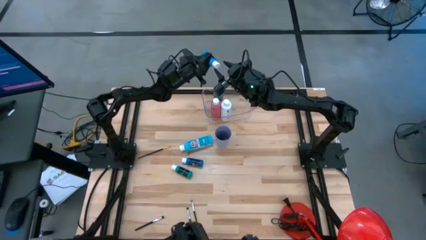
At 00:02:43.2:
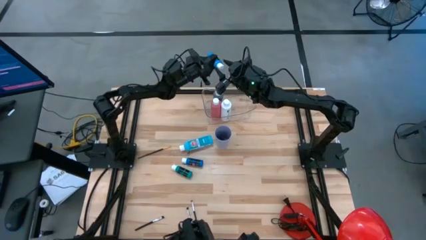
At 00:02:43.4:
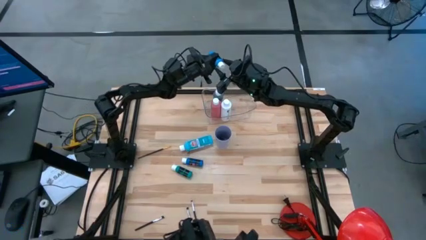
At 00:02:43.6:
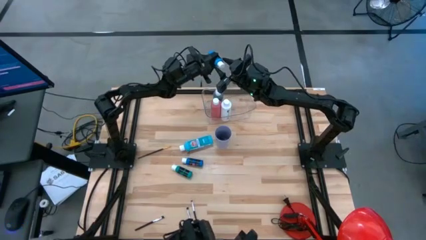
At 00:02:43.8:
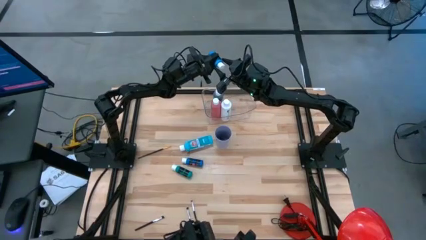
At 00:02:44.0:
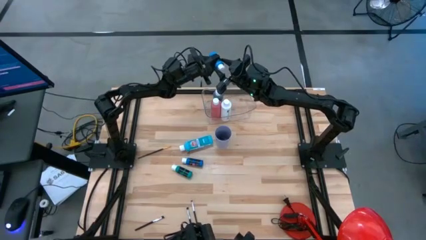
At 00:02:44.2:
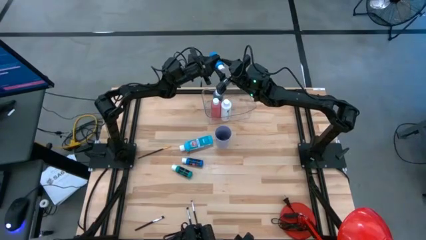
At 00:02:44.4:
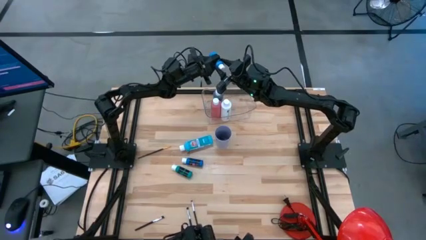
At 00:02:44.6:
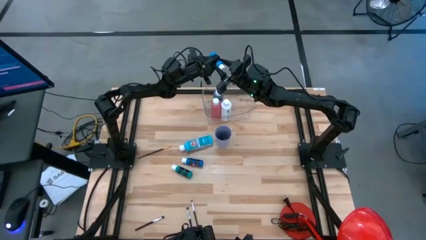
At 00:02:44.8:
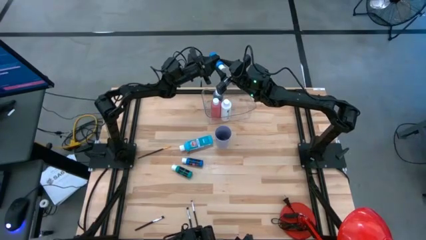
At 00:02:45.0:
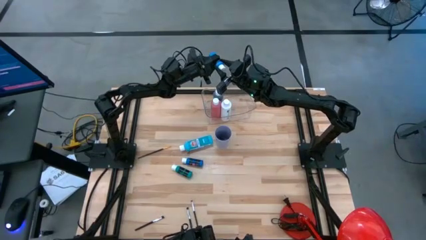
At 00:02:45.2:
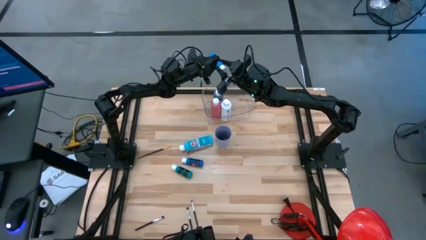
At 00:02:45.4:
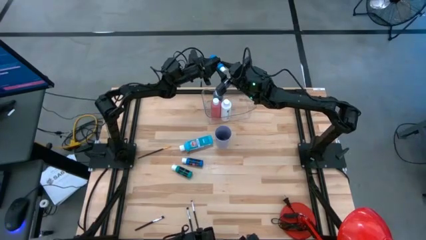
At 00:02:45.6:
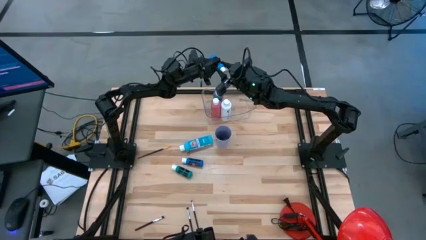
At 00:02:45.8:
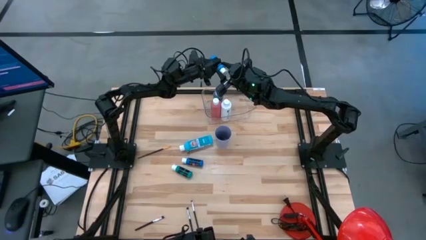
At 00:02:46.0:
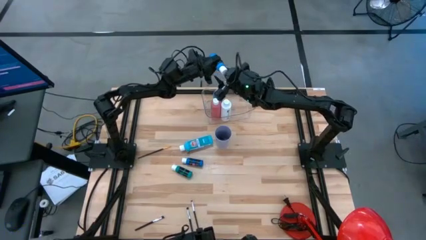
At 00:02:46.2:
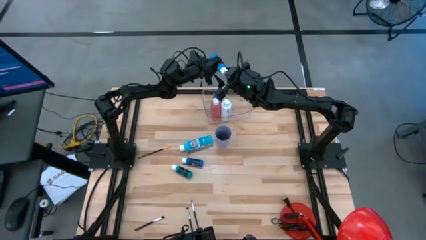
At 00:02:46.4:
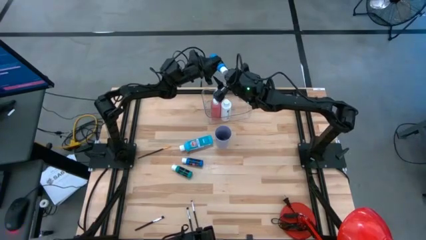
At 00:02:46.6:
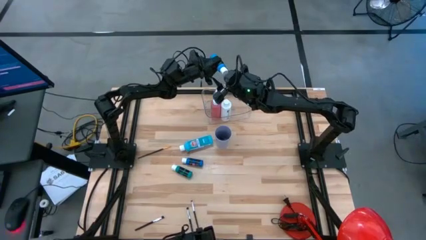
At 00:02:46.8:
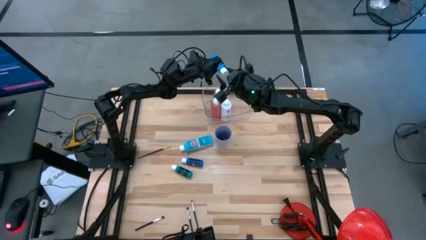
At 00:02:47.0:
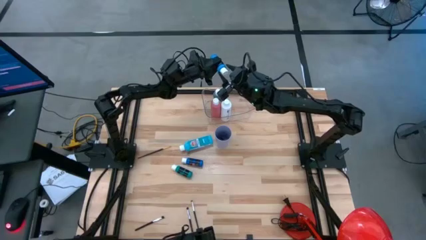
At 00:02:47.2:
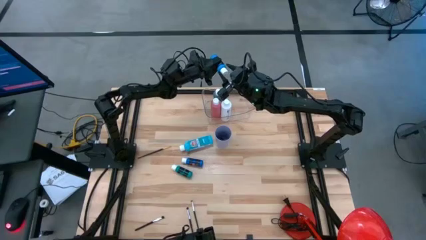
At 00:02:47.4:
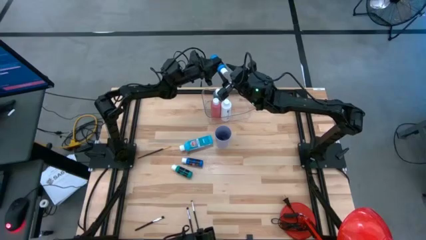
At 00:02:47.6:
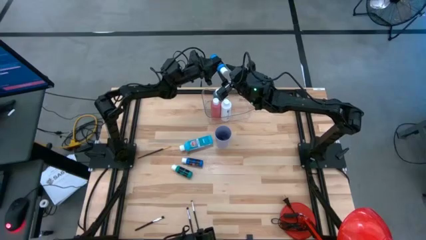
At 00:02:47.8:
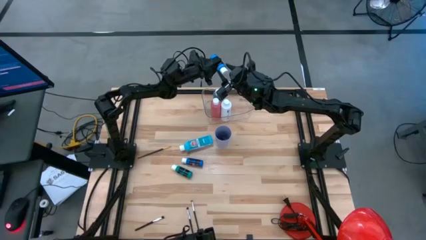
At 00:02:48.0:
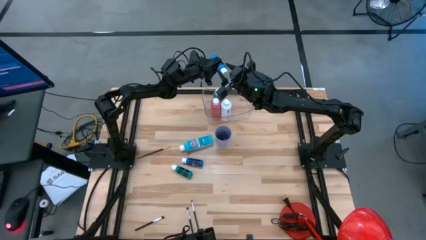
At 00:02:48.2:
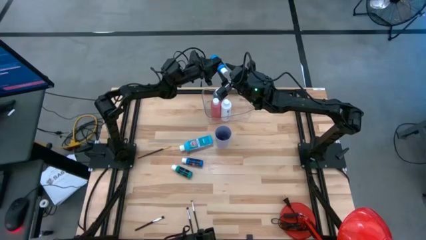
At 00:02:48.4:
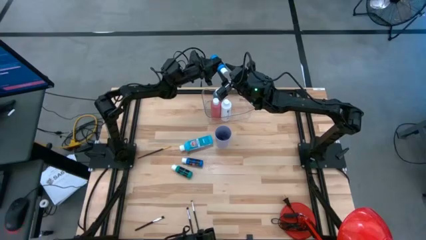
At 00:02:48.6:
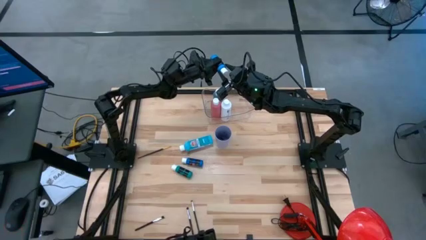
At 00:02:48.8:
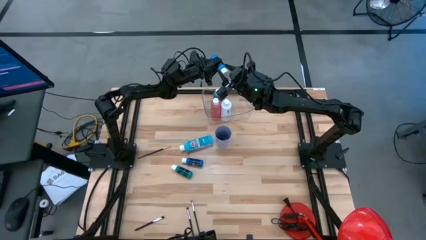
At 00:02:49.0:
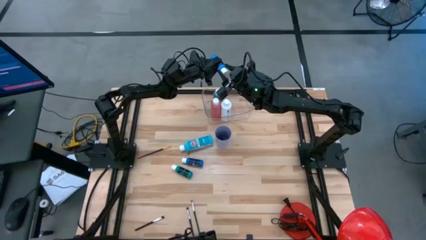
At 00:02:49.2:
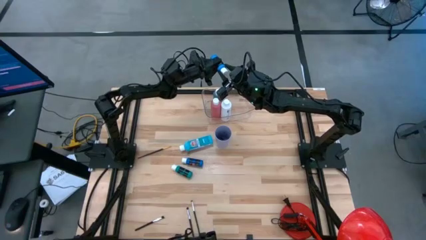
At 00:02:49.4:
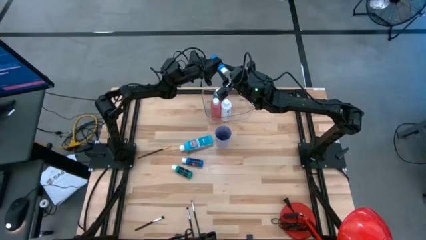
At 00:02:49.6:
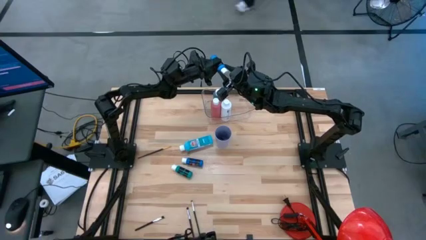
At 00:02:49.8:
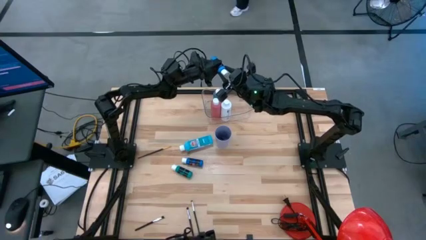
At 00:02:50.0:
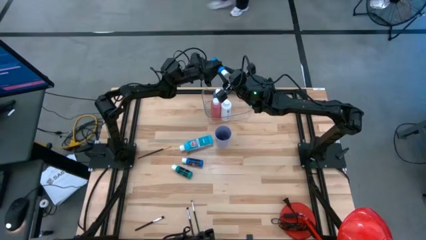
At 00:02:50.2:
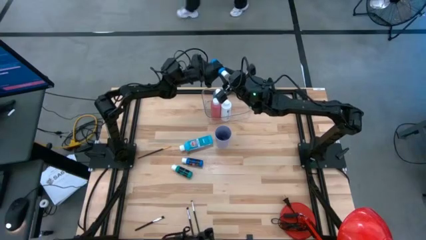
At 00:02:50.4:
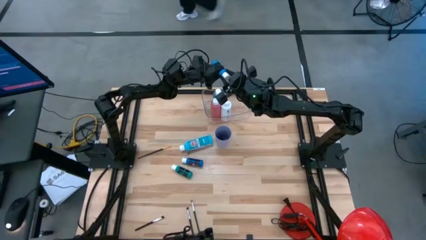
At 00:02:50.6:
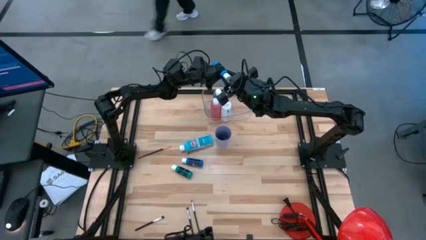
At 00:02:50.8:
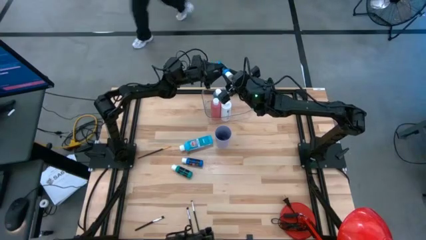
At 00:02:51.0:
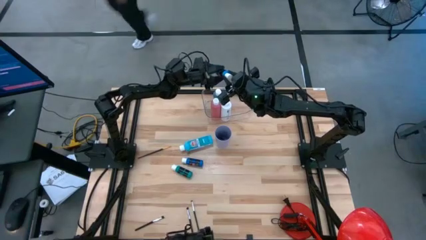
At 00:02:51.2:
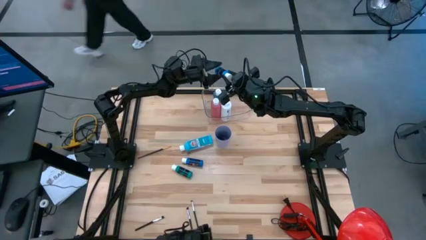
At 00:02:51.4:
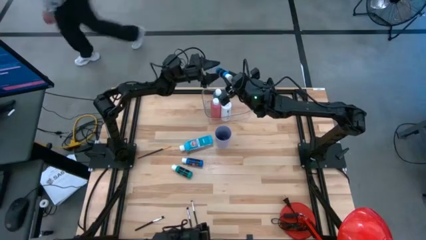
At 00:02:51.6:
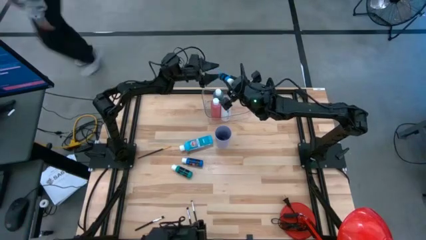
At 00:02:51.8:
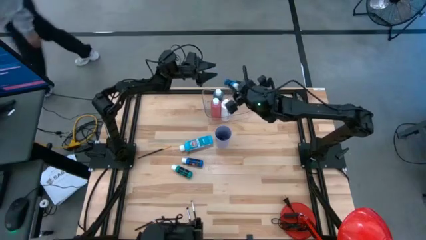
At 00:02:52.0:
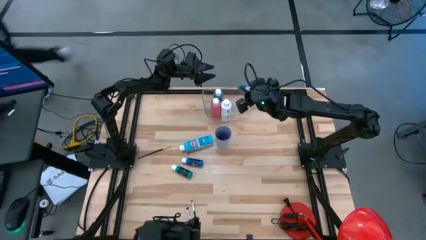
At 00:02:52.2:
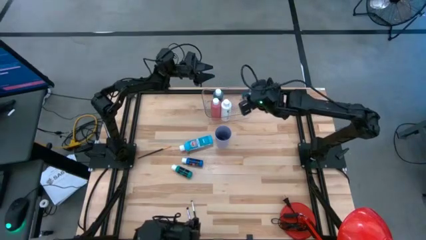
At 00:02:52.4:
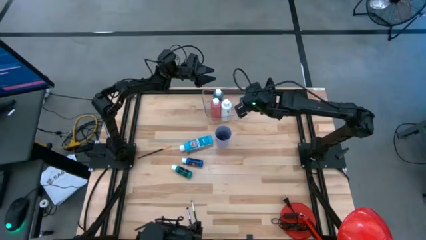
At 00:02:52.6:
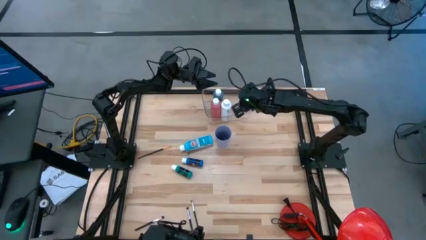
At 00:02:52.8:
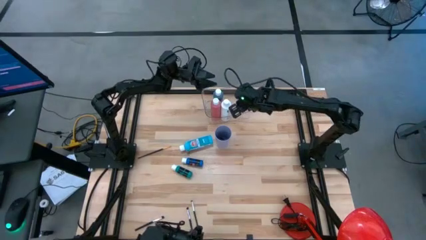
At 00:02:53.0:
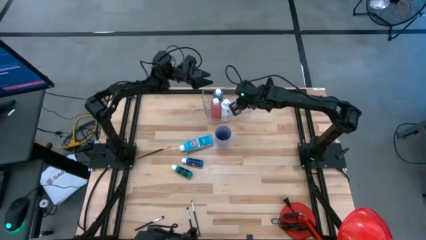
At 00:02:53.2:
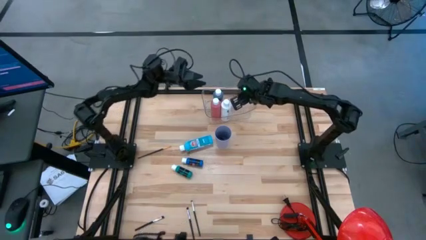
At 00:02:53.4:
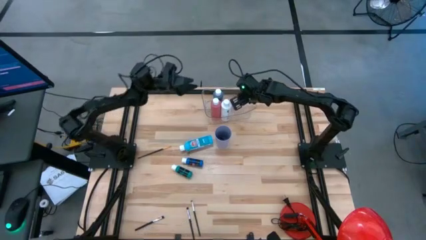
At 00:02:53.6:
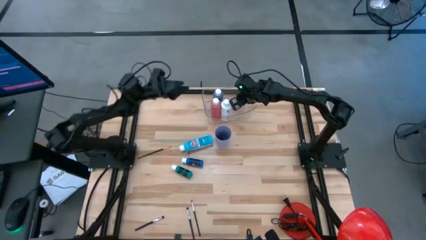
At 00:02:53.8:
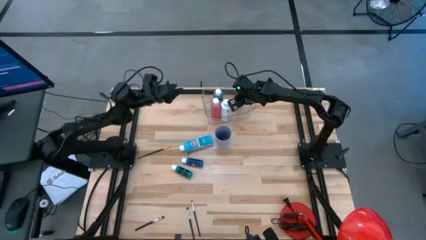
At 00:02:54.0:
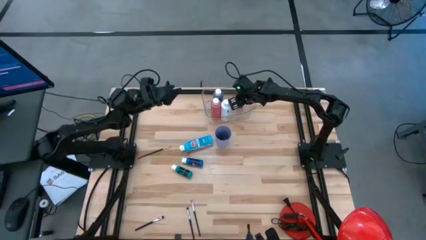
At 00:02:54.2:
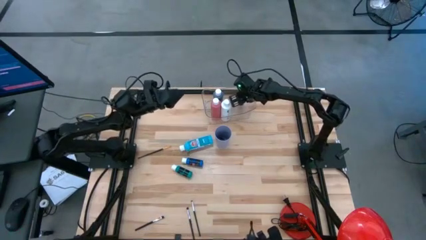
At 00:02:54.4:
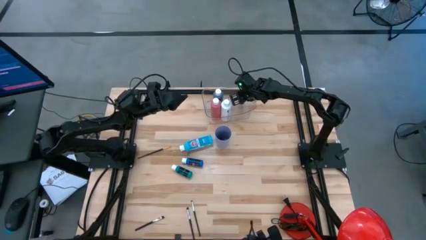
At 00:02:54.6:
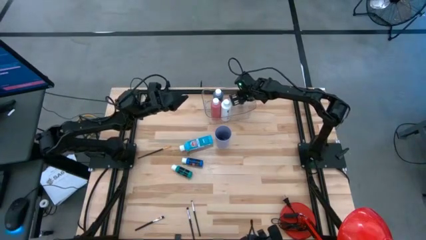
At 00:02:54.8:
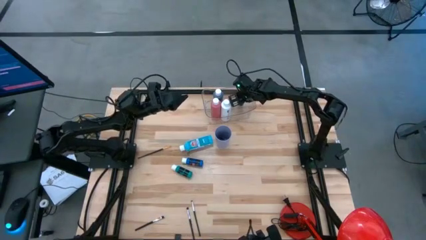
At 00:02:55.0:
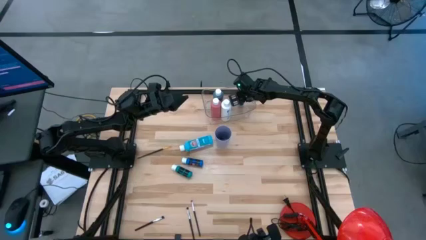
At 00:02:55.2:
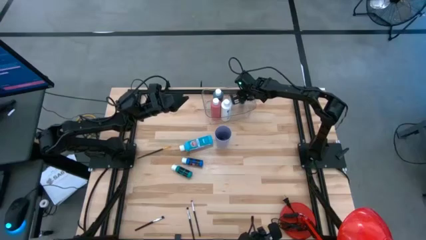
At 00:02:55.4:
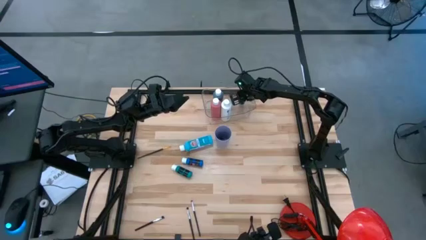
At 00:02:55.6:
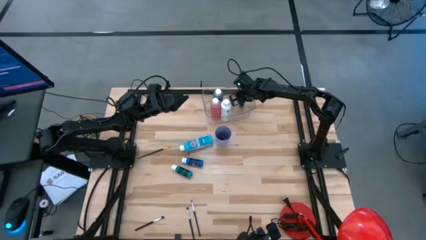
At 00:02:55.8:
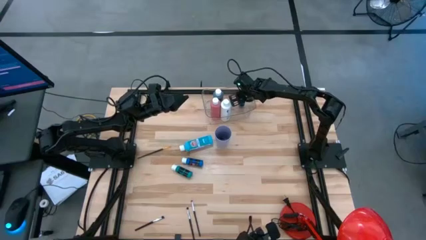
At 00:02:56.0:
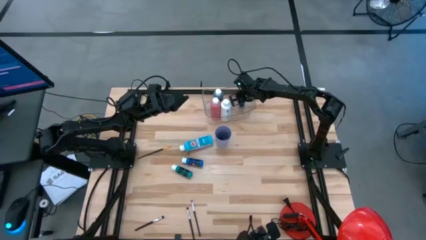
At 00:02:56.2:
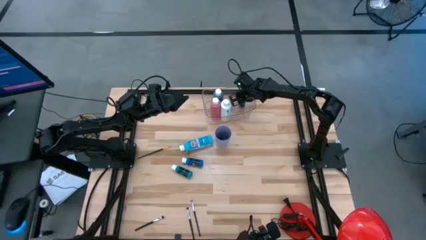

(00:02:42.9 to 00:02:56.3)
Task: Pick & Place Paint Supplies
Adjust the blue paint bottle in the transparent bin

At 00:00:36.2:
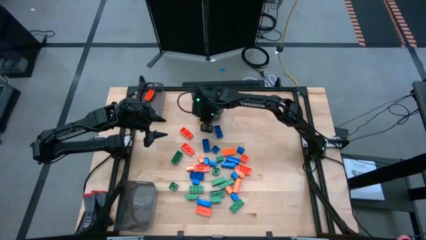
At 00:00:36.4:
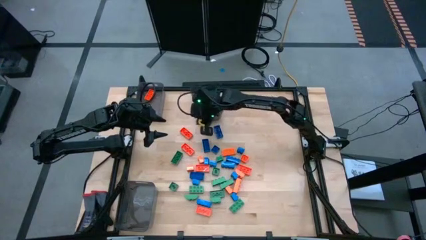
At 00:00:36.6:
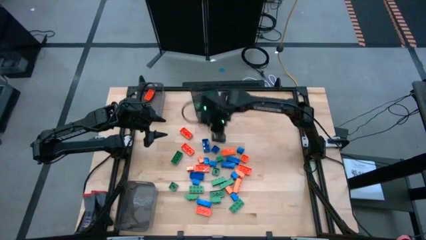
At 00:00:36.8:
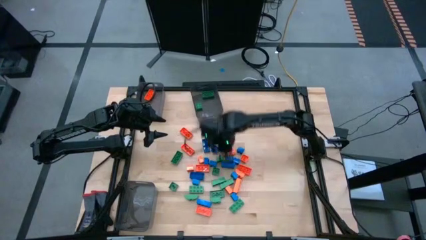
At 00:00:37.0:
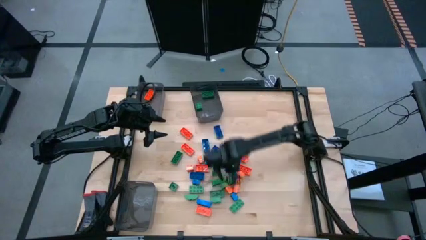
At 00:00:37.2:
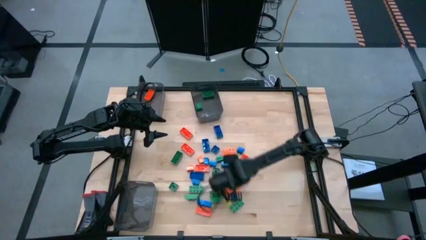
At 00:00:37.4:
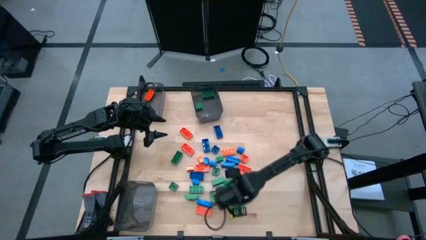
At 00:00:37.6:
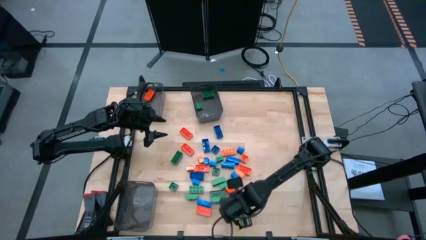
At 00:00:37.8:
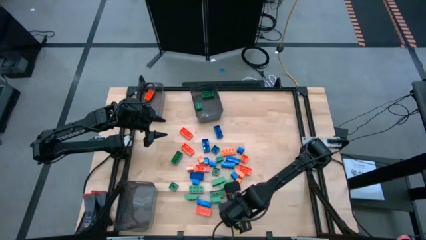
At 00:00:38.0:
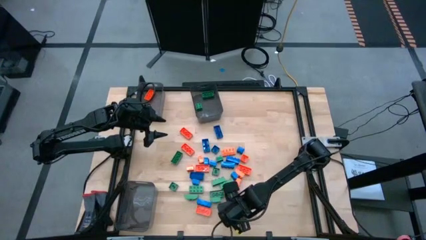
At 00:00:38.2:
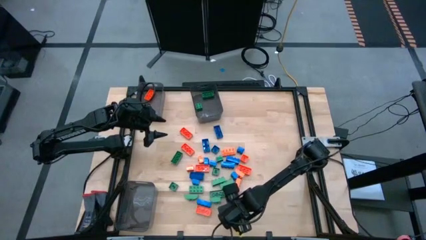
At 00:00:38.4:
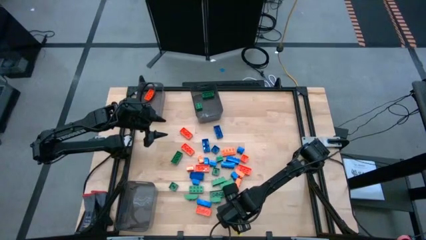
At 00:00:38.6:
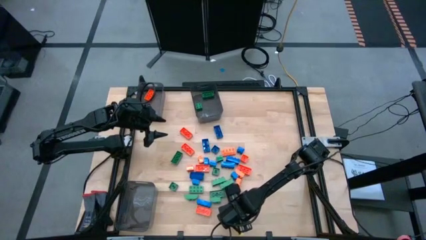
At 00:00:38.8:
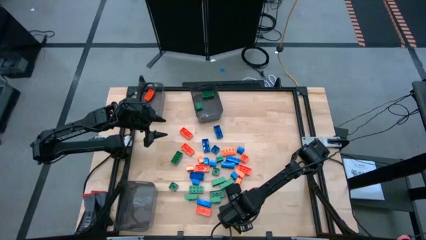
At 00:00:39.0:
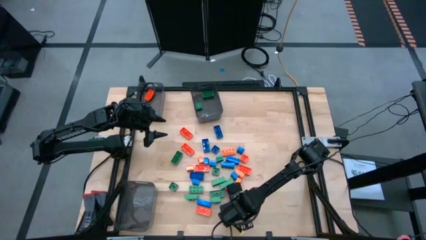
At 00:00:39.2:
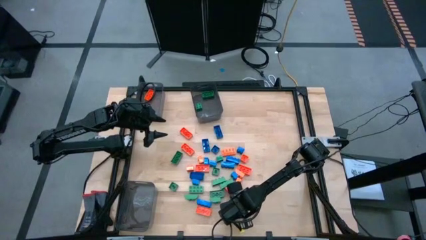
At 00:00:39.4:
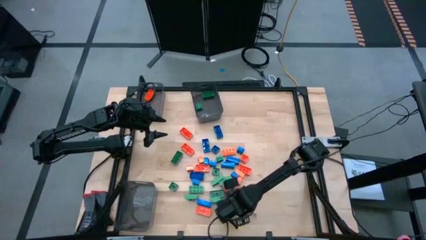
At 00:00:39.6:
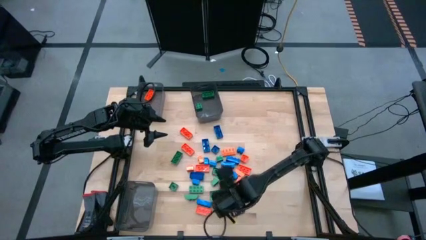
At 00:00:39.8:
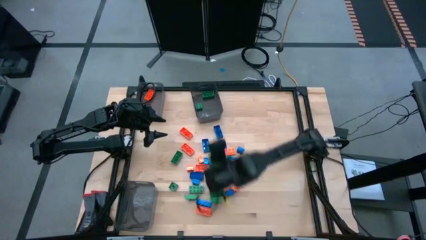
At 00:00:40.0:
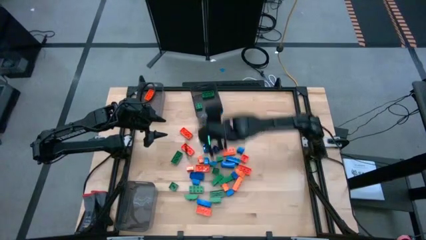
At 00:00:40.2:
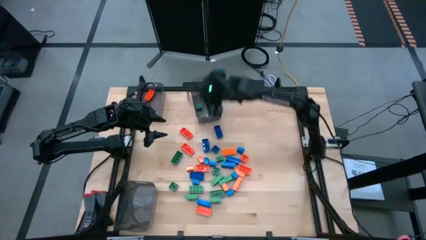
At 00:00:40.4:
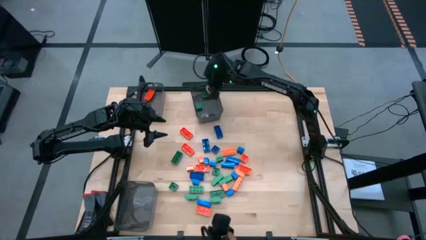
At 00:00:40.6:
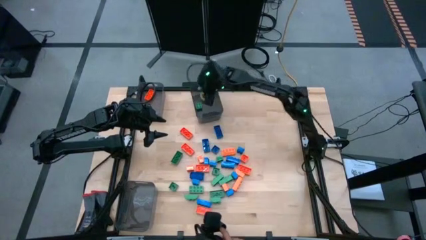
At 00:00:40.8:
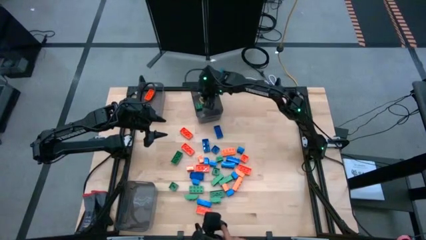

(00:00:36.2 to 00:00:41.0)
Task: Sort blocks
Put the green game piece into the top right black transparent bin
